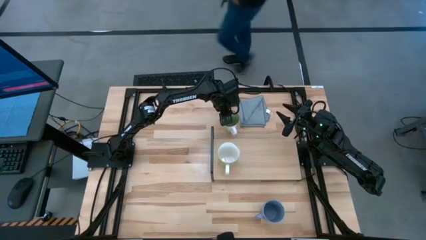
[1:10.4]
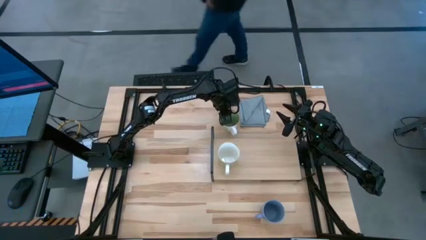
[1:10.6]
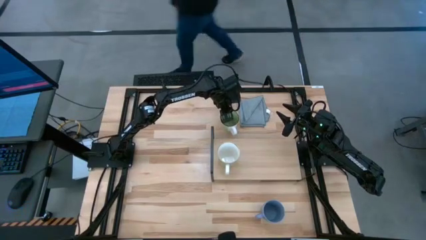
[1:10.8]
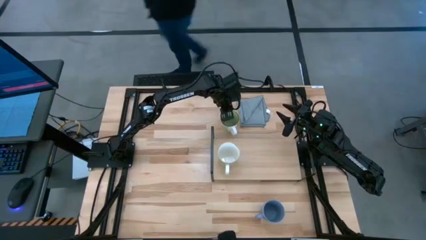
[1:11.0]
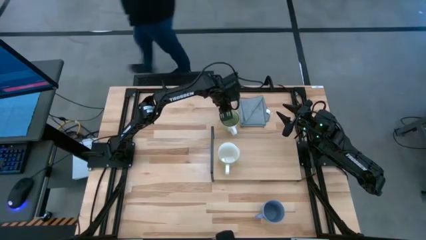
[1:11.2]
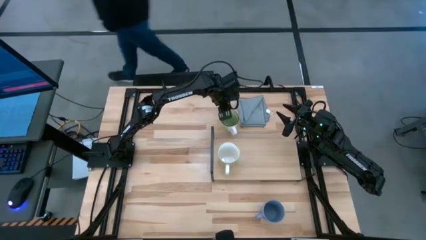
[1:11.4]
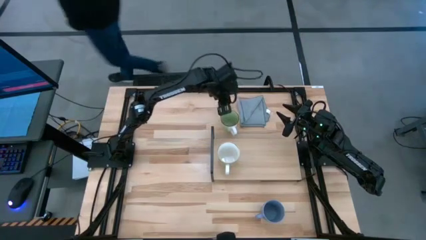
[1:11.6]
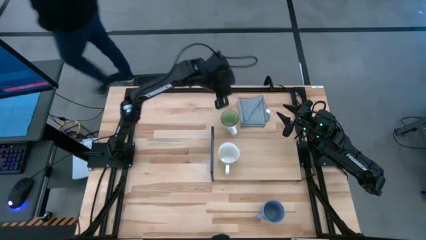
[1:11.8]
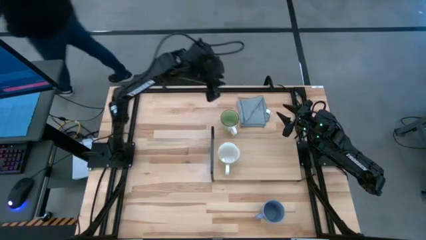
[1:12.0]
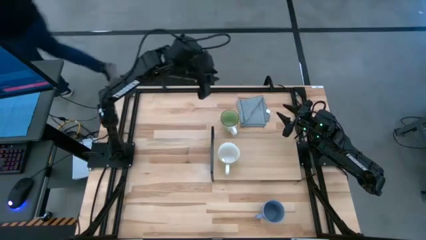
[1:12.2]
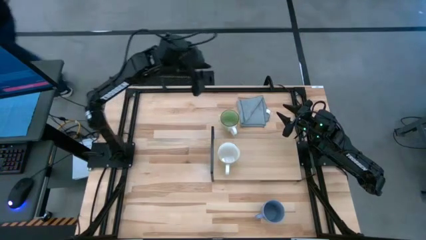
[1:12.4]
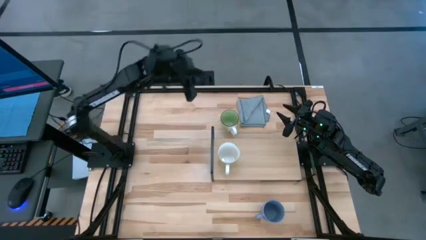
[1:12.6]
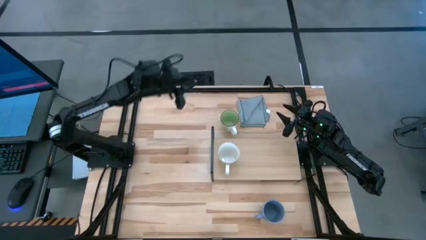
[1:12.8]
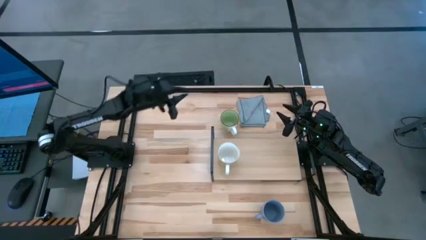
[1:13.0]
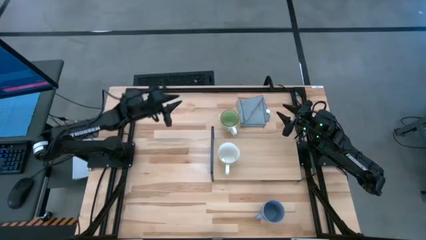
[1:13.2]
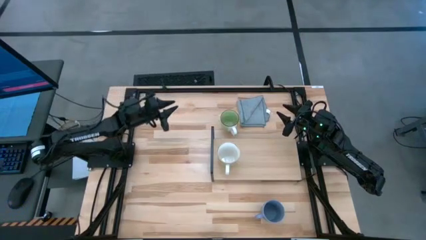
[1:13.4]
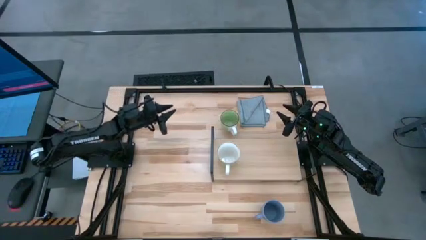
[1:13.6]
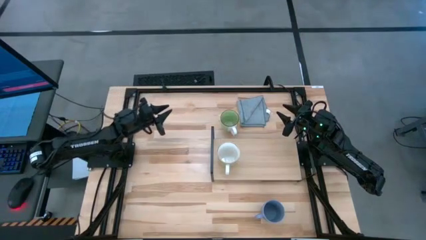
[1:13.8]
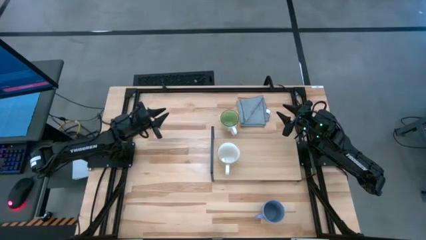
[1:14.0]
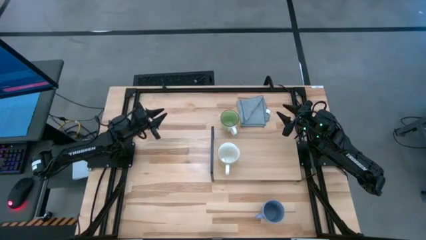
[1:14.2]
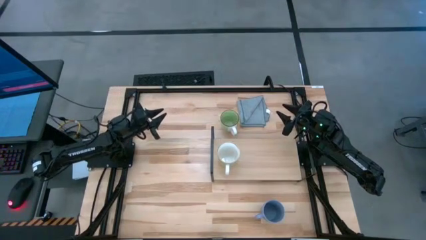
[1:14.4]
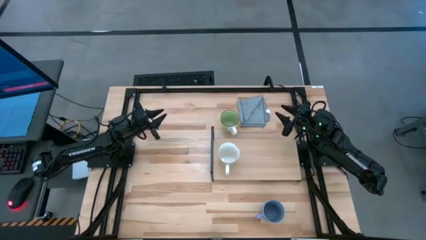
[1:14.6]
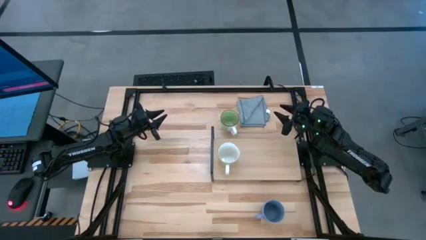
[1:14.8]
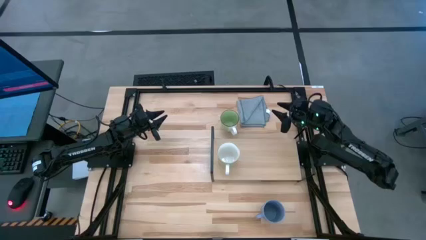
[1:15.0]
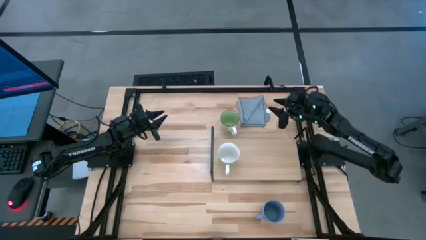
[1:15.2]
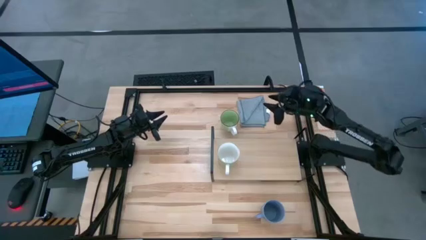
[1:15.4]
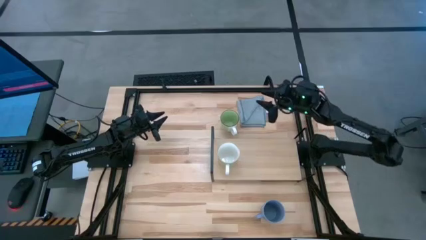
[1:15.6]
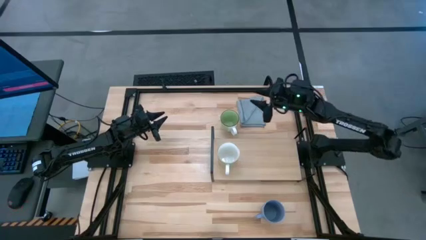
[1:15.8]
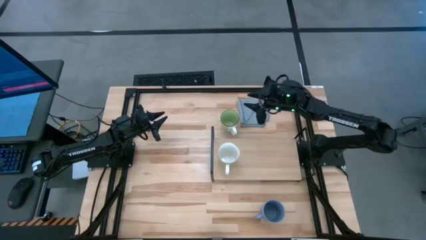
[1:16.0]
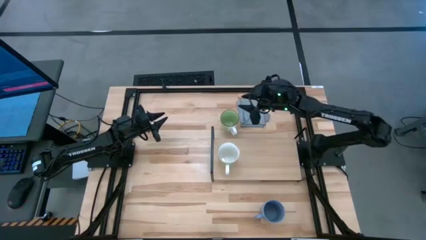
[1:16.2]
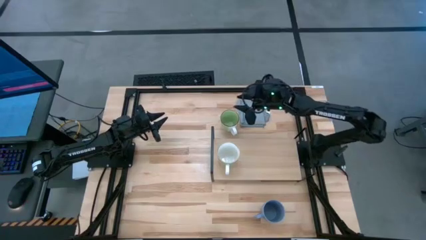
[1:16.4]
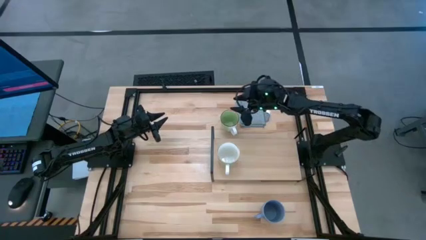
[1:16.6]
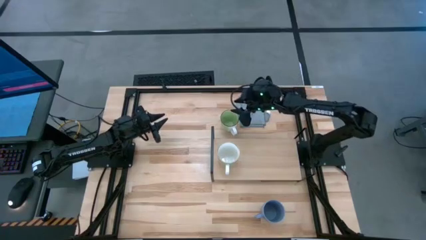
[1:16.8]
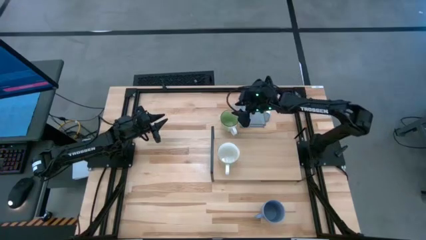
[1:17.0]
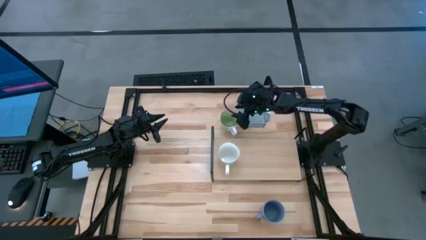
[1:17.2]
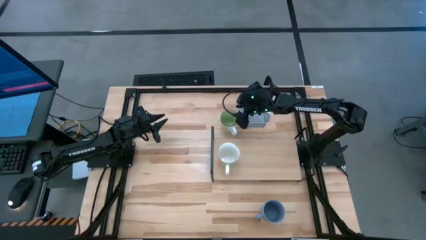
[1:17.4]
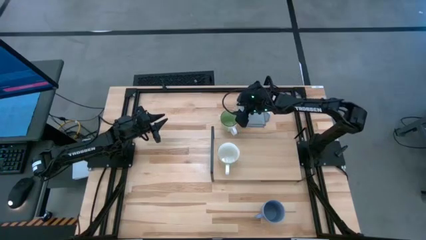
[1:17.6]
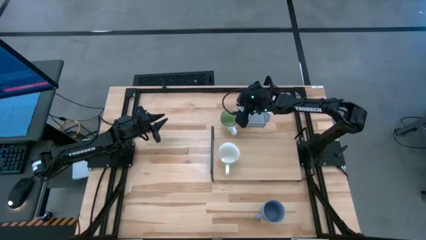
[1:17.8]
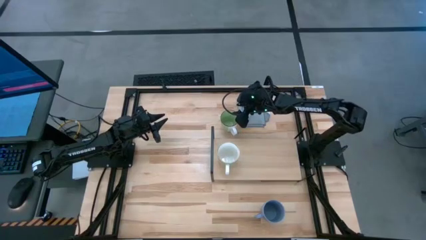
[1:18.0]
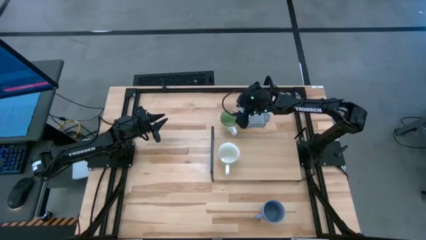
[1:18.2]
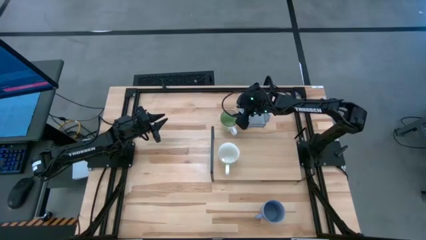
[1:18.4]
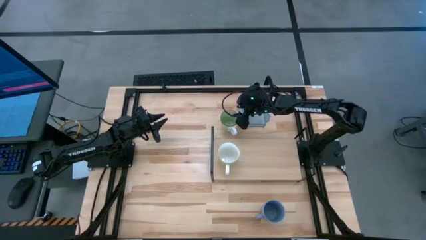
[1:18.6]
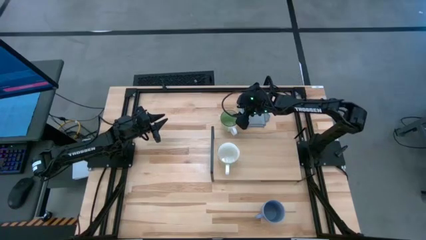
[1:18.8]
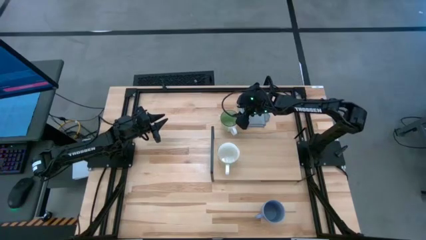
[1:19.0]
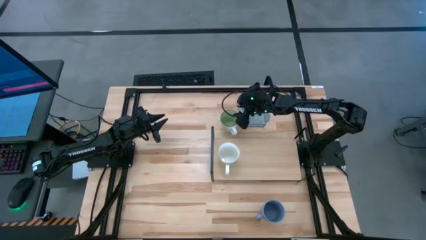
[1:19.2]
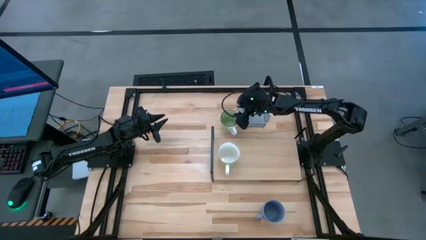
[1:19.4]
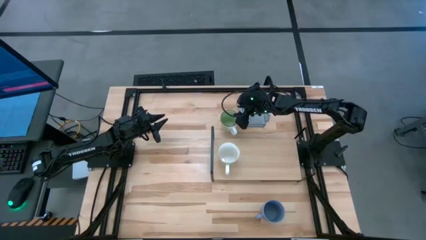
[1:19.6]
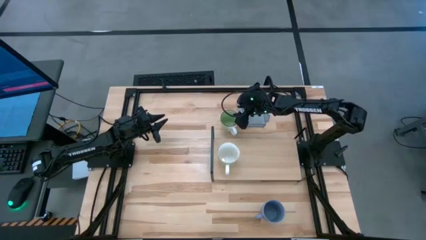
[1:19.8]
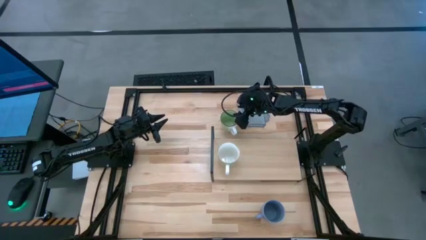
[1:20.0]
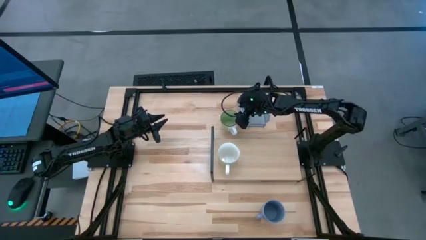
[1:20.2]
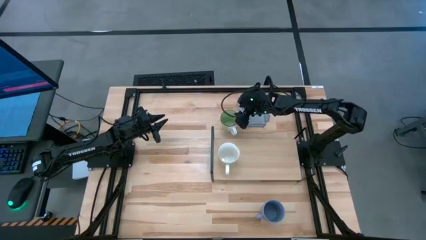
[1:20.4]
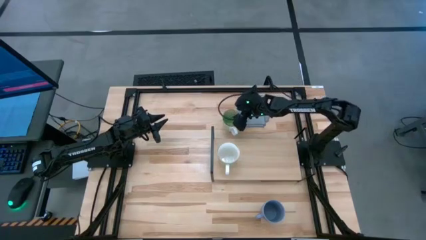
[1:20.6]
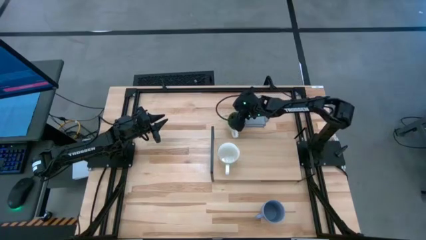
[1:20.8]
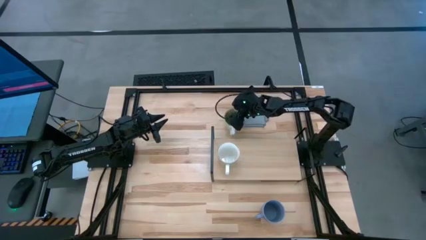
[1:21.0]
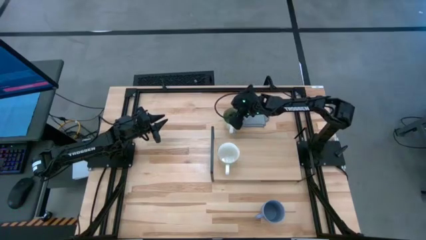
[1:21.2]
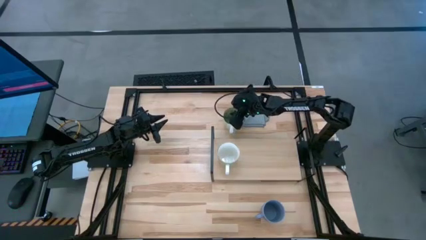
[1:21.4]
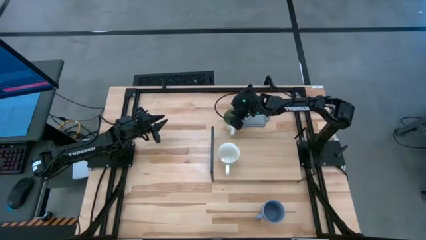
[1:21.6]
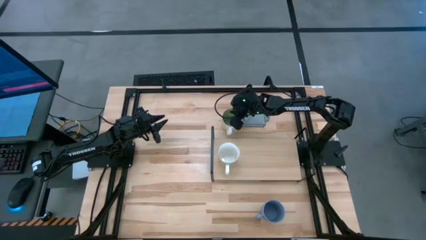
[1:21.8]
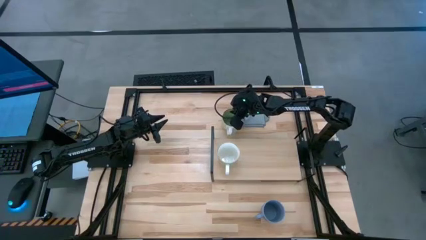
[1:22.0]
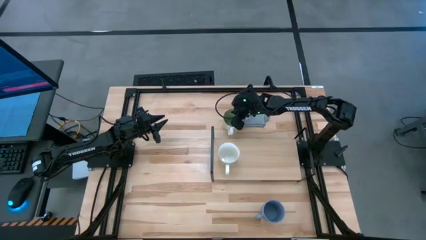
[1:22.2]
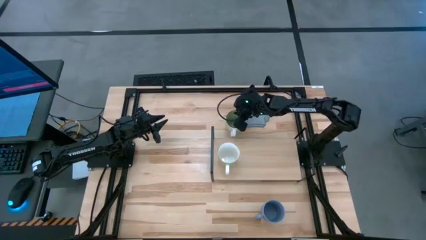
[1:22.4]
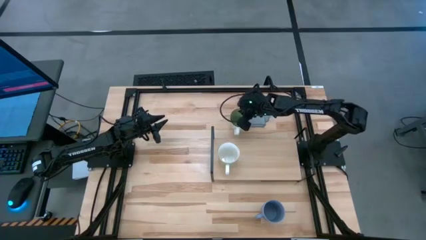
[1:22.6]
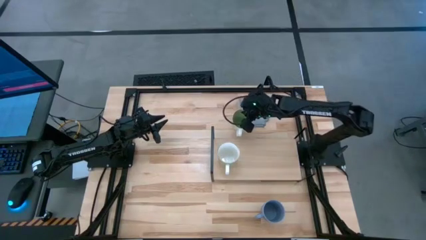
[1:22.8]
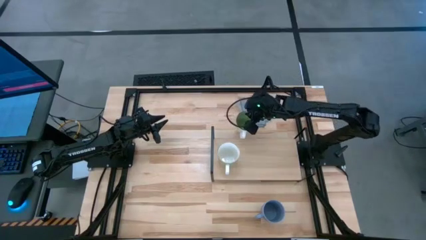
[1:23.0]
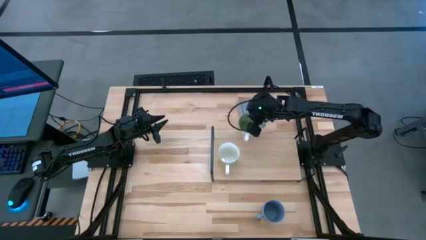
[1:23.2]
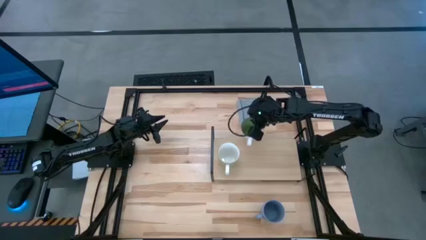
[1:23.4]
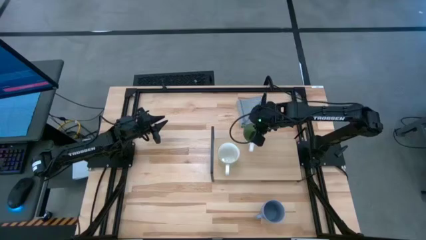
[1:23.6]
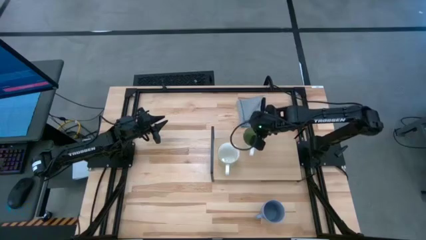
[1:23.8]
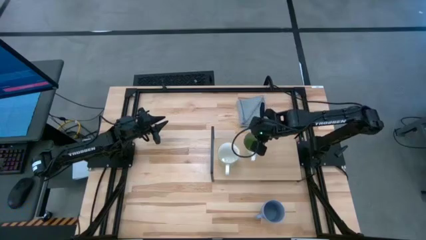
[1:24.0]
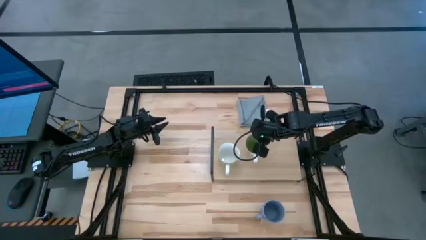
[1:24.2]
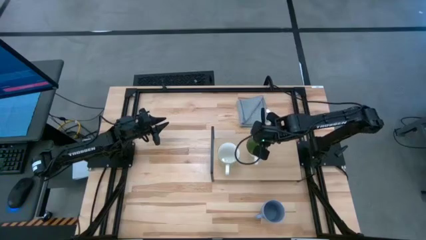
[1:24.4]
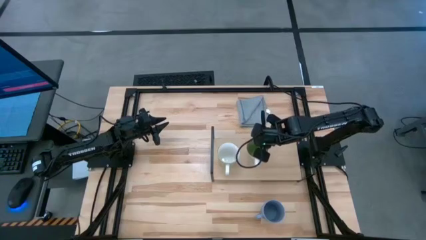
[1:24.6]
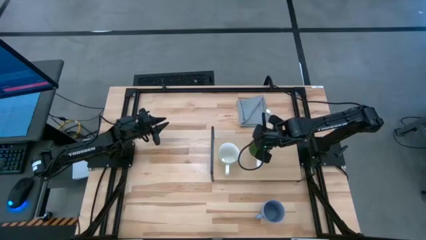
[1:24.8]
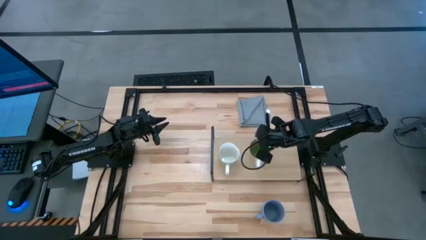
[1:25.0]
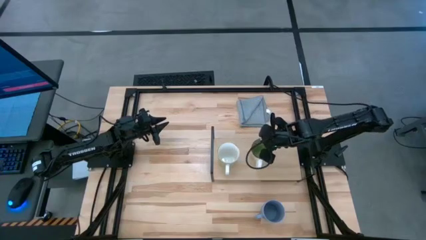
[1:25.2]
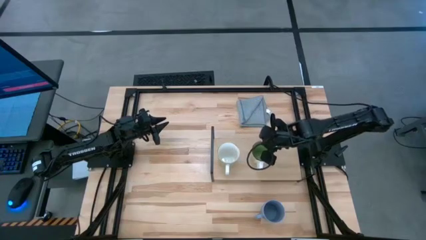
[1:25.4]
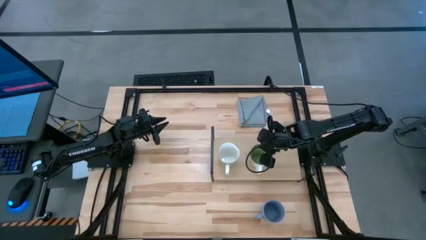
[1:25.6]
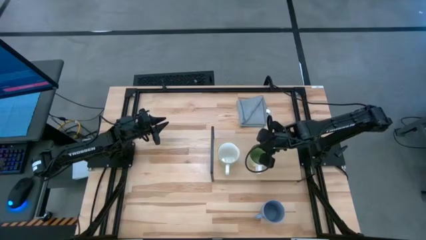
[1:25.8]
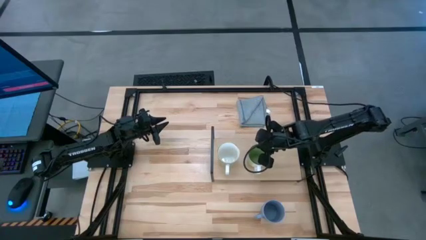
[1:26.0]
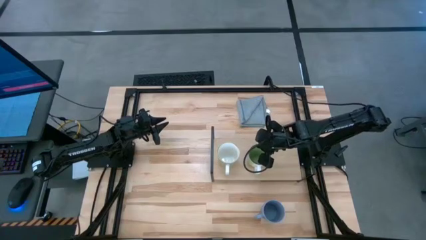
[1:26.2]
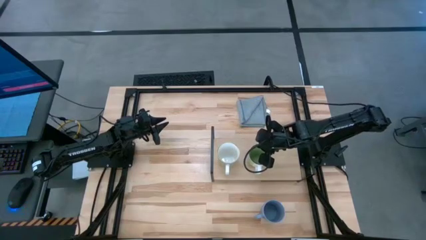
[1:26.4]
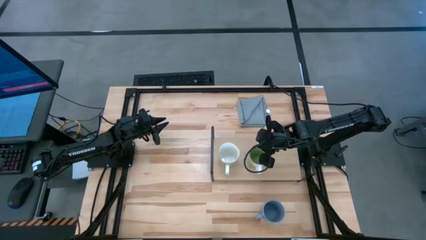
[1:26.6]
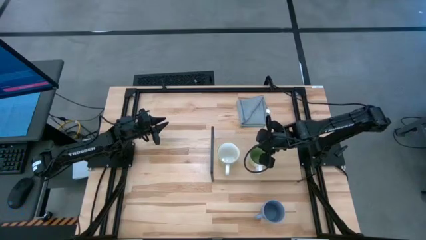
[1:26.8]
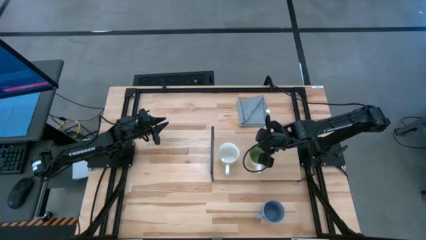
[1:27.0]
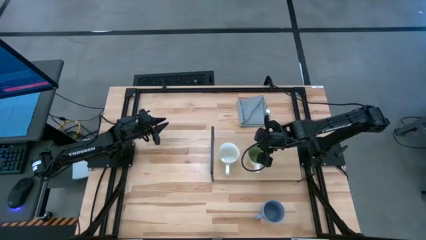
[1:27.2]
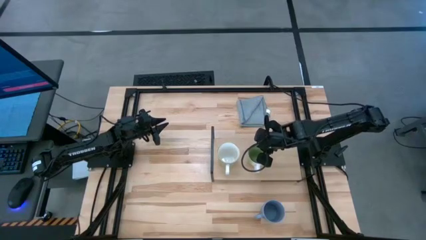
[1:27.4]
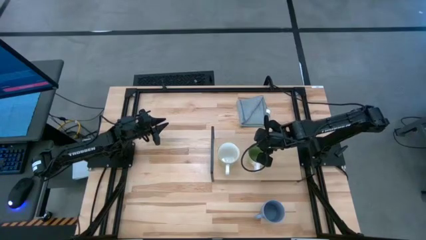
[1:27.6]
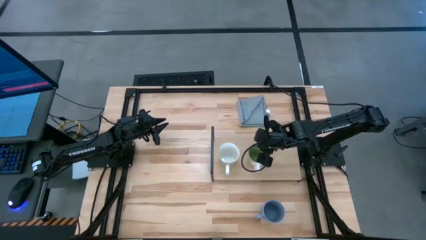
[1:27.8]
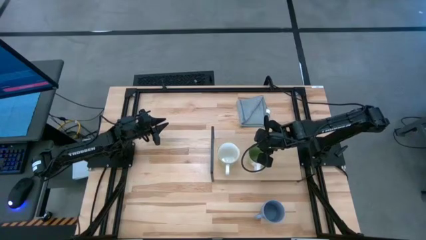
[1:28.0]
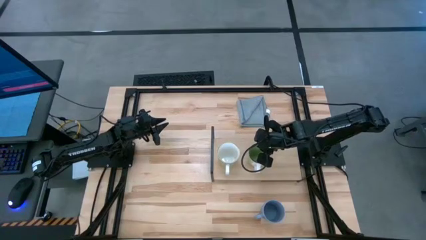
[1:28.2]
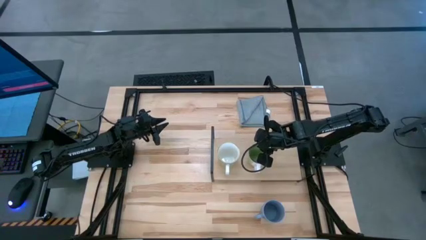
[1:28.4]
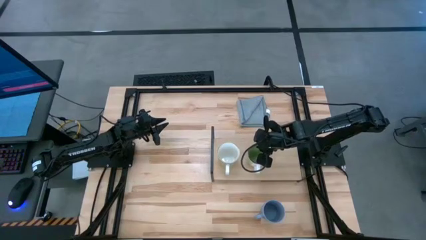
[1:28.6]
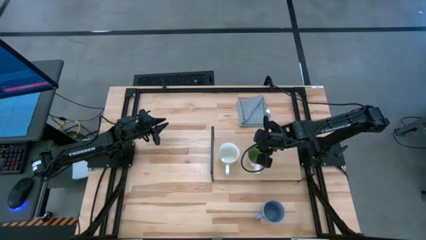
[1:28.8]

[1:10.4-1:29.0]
Task: Stack small to large cups/mugs on shelf
Put the green mug on the shelf
